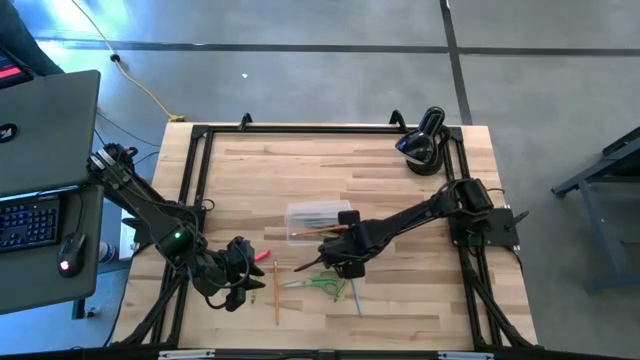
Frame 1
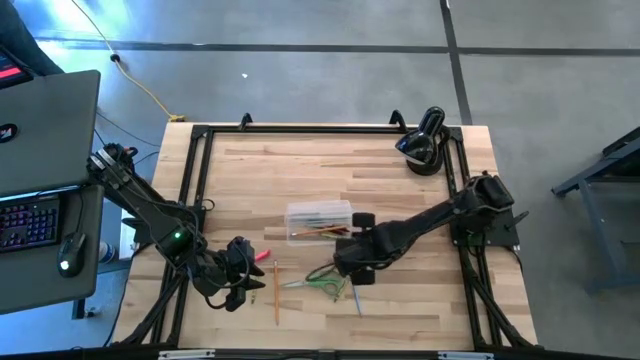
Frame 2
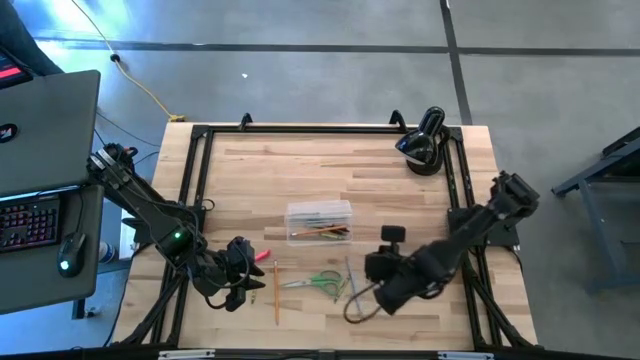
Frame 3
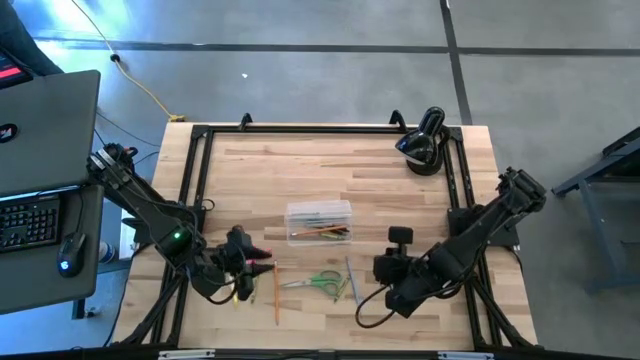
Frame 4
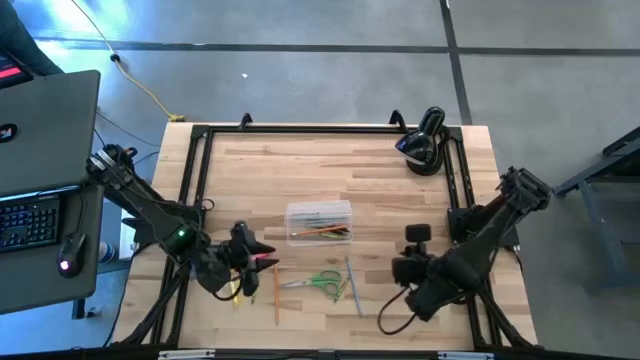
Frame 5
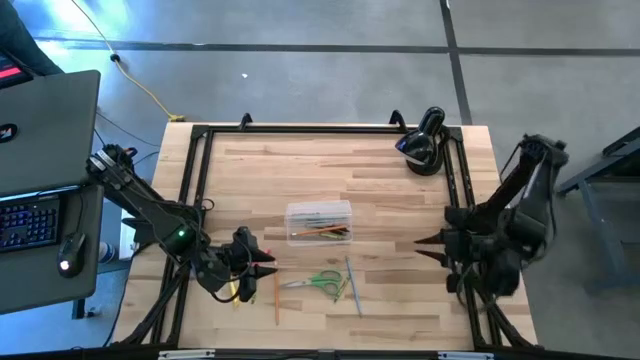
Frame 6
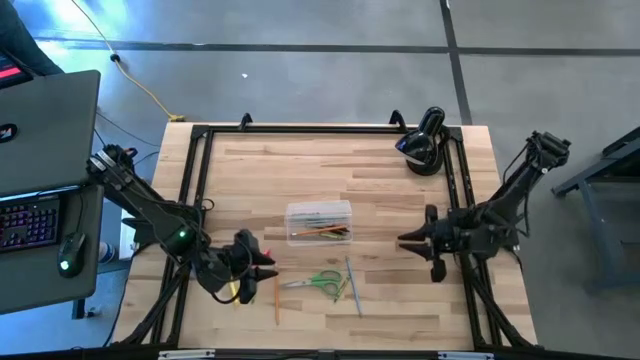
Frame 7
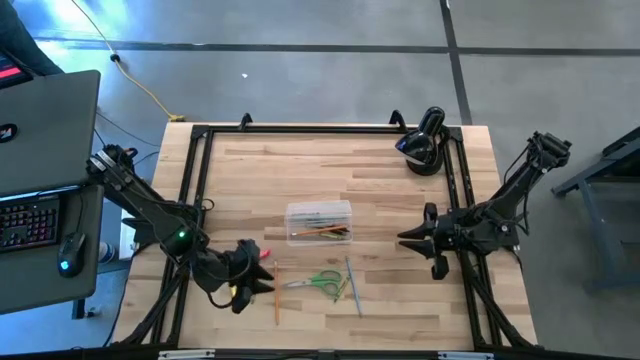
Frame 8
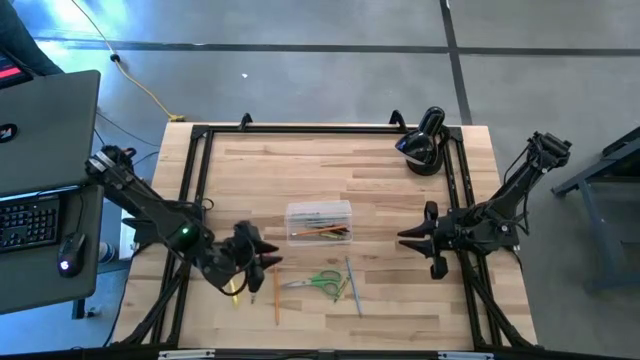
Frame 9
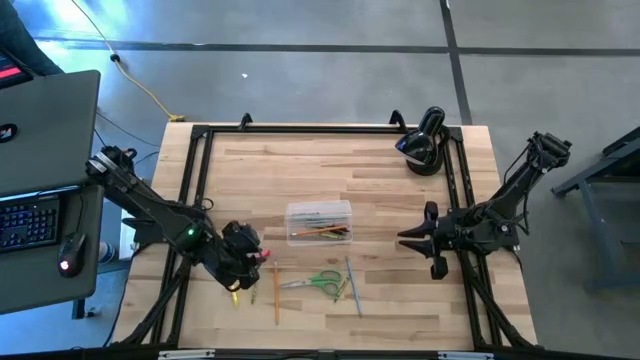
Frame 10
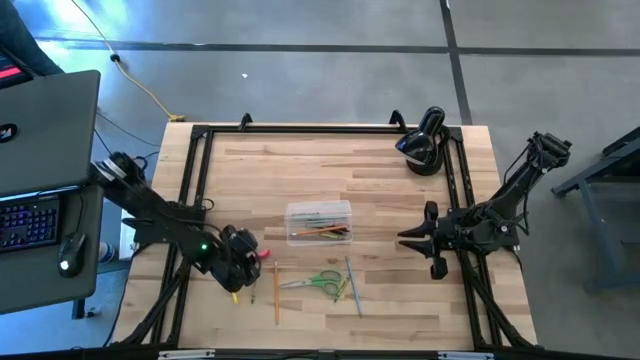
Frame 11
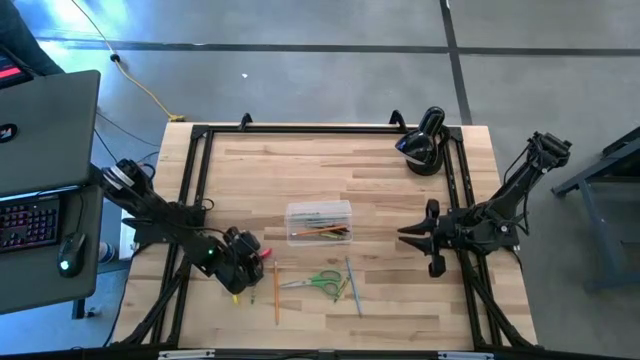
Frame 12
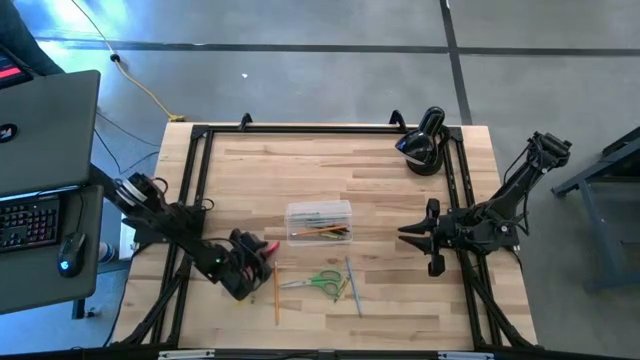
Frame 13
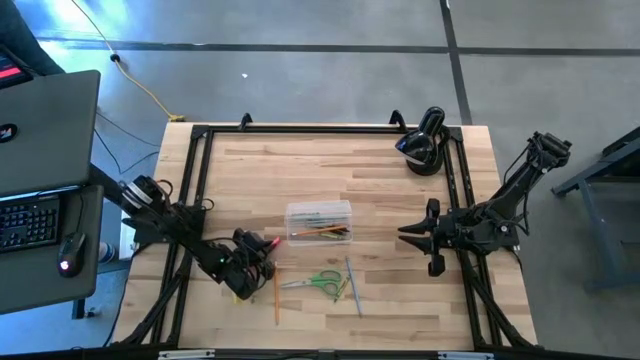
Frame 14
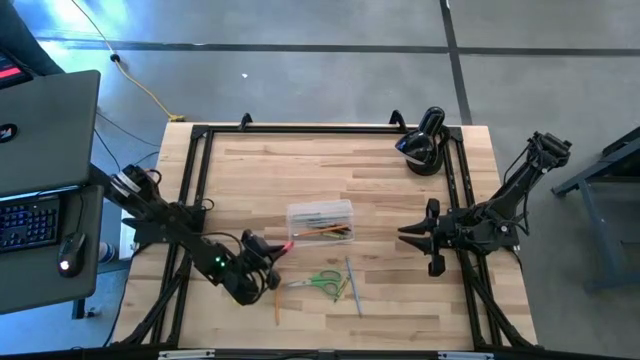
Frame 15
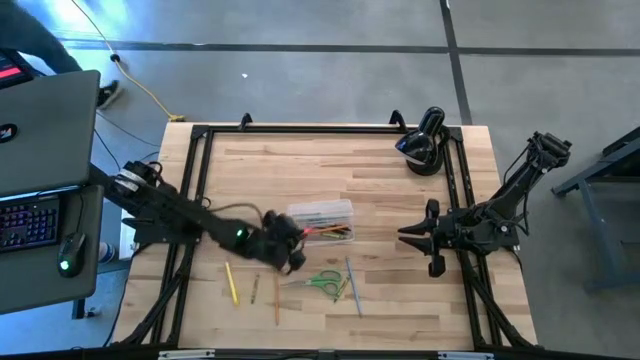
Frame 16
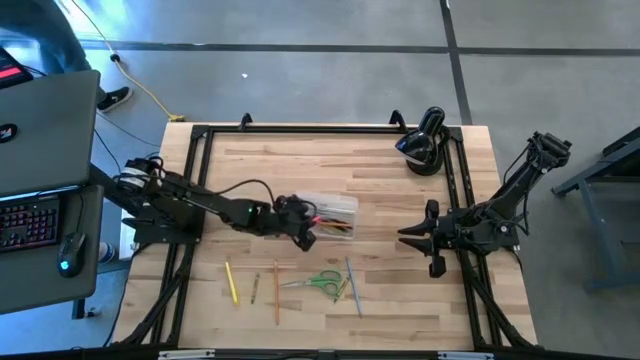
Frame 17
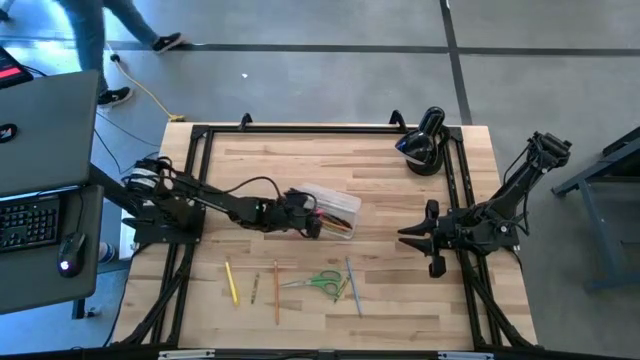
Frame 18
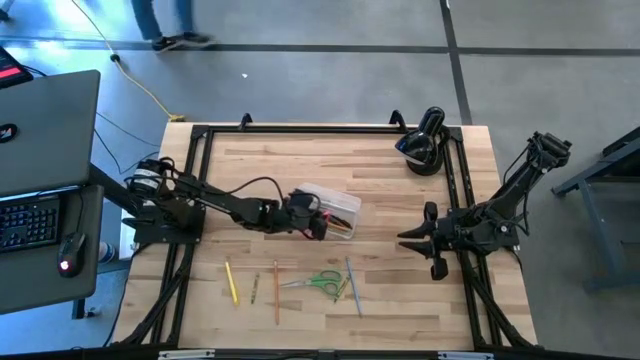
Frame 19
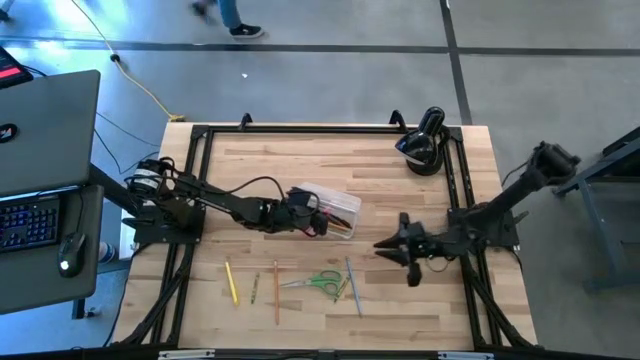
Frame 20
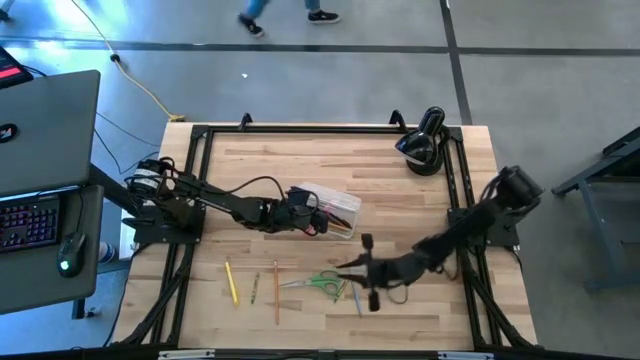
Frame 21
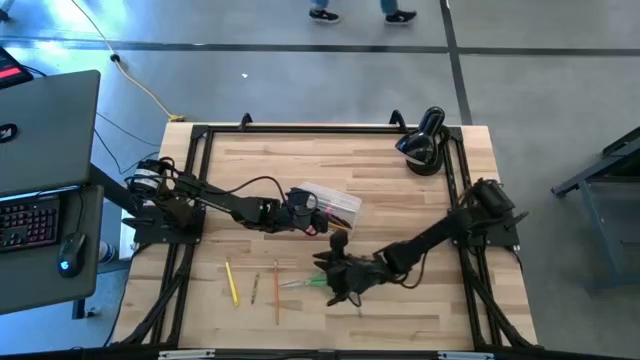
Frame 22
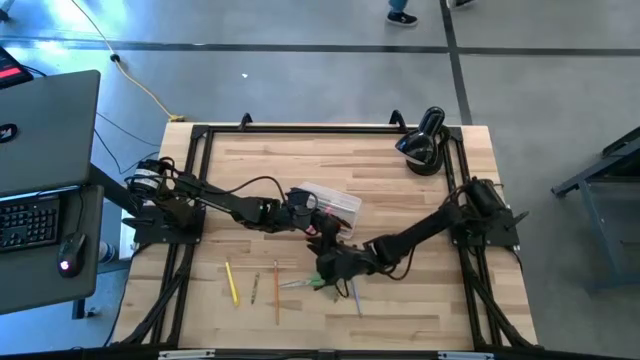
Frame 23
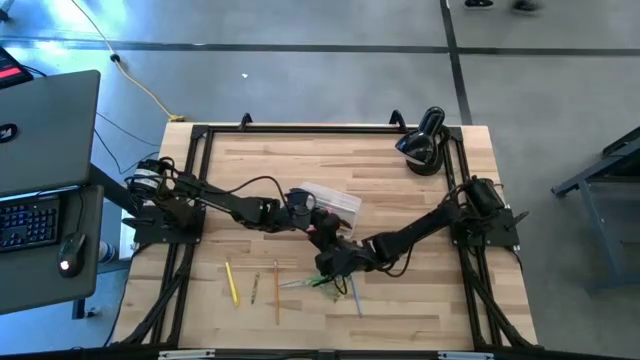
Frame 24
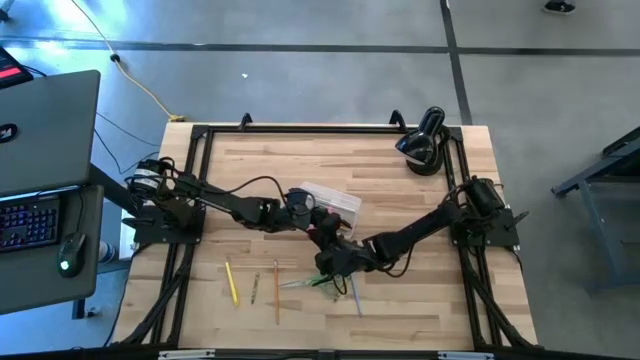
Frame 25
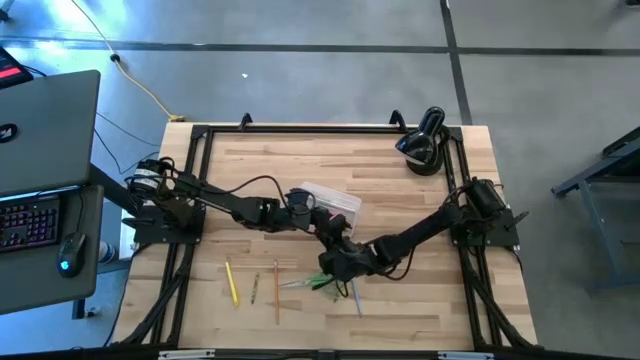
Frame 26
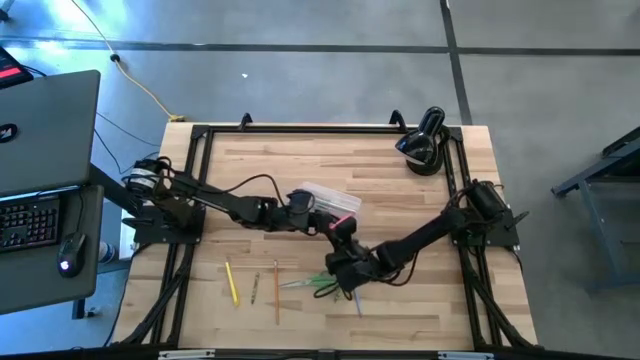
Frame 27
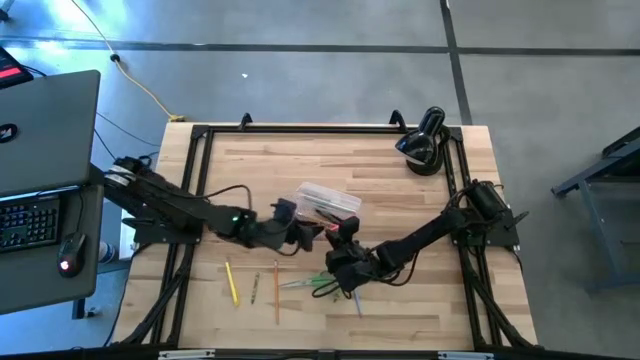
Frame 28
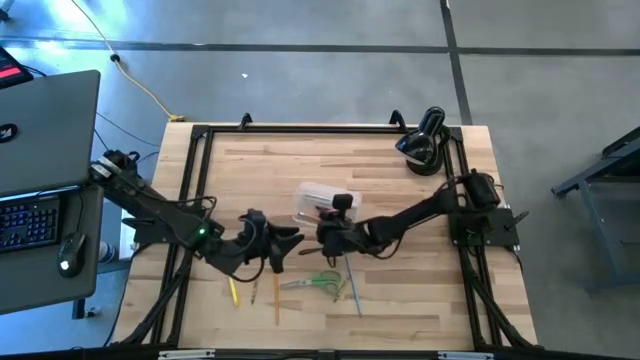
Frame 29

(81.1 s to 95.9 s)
Task: Pick & place school supplies into a supply box
Put the pink pen into the supply box

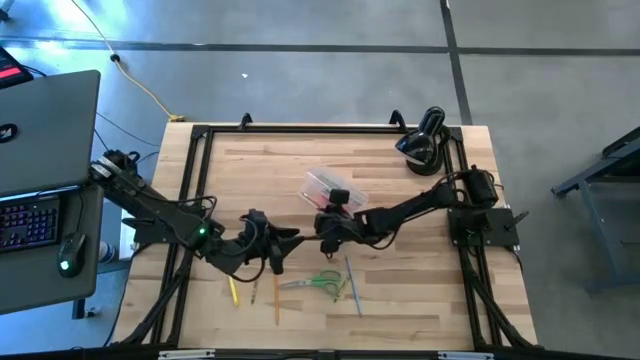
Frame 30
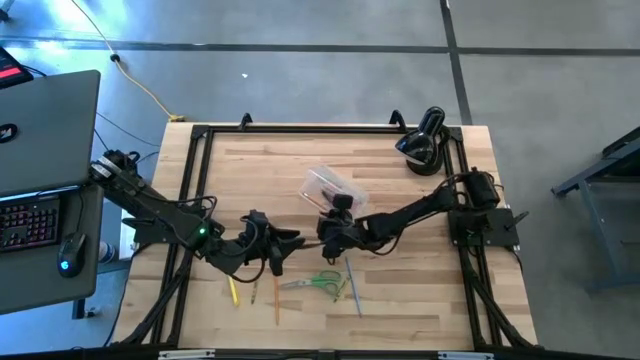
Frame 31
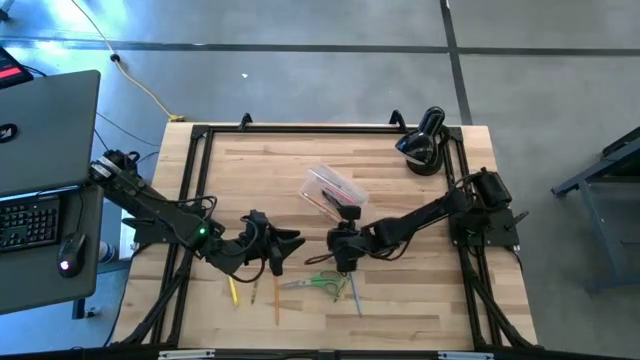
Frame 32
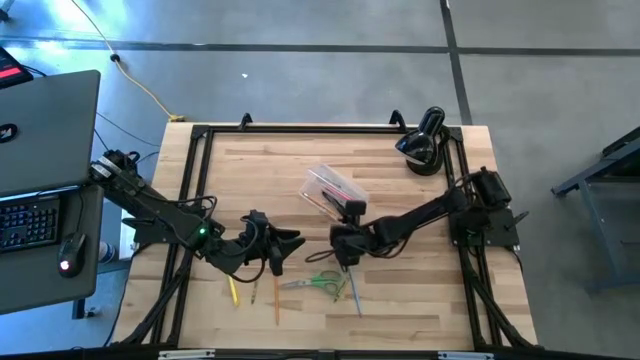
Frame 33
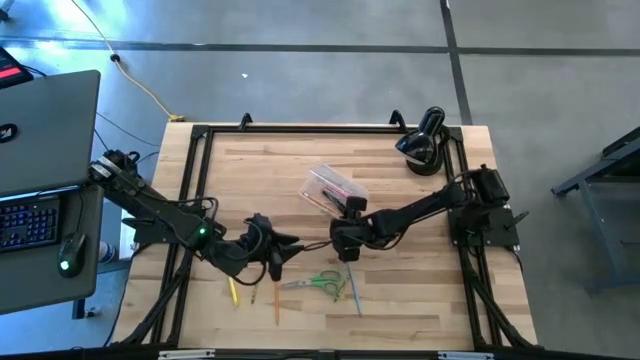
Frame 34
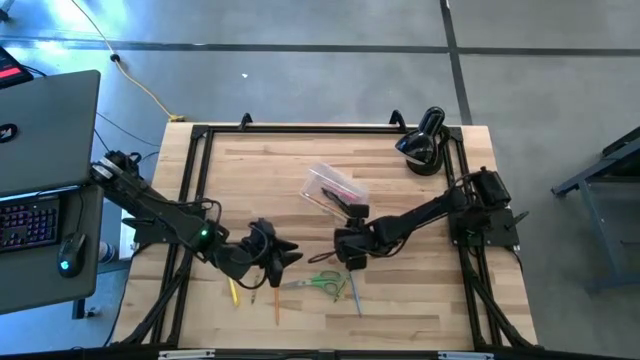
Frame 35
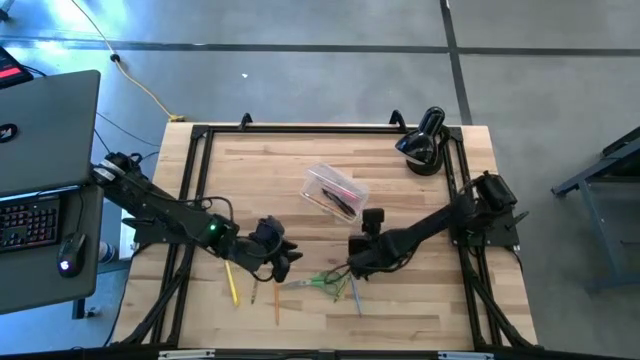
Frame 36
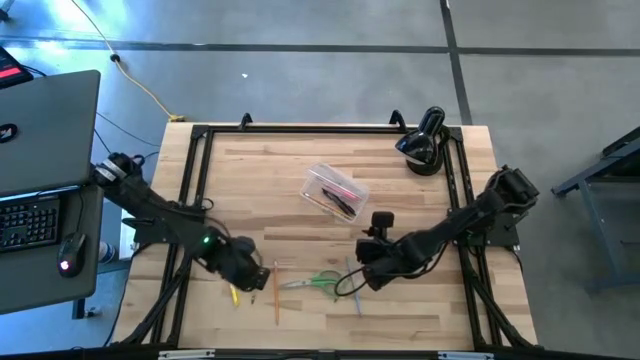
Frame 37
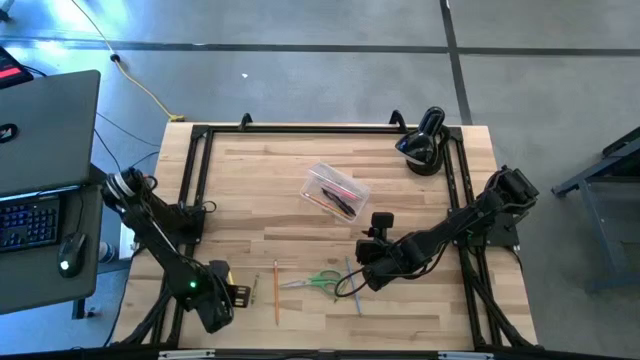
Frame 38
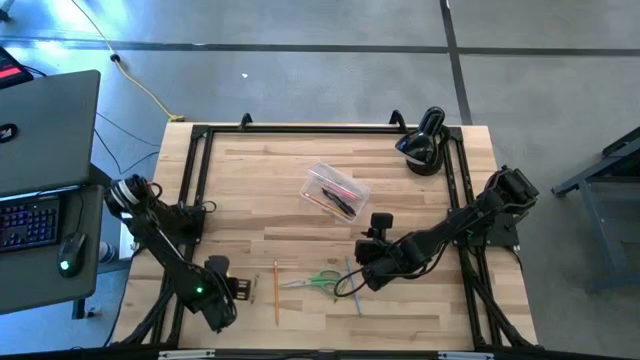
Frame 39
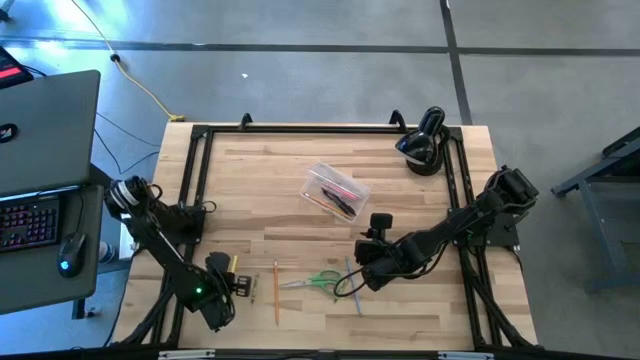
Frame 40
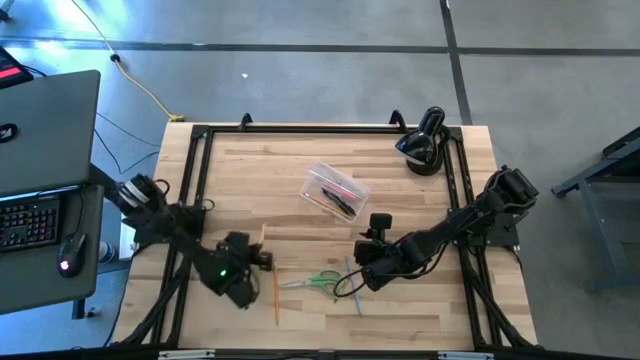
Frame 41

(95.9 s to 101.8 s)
Put the yellow pen into the supply box
